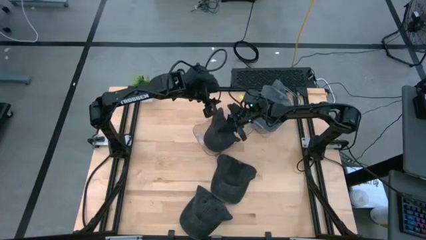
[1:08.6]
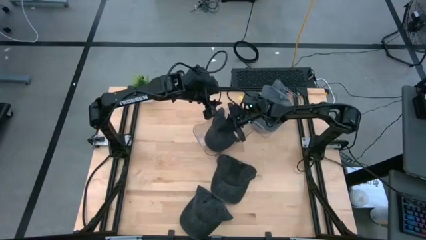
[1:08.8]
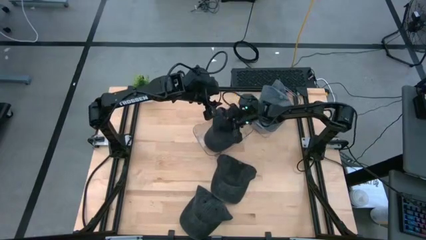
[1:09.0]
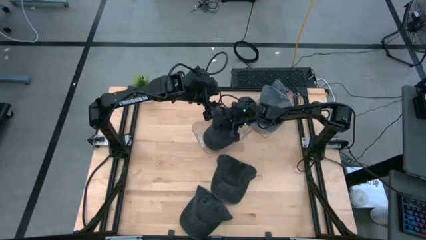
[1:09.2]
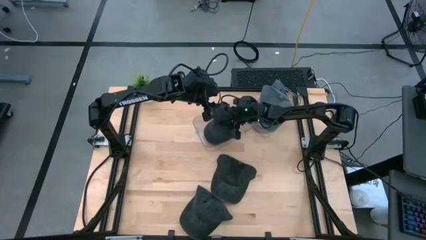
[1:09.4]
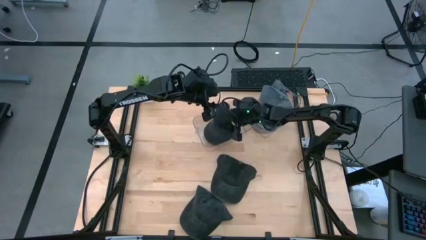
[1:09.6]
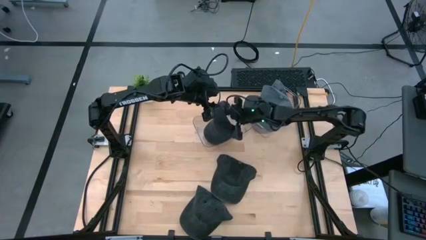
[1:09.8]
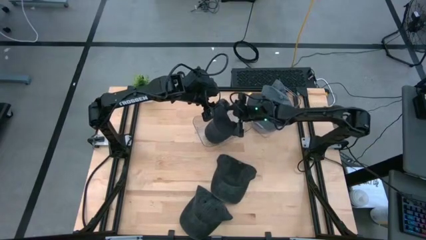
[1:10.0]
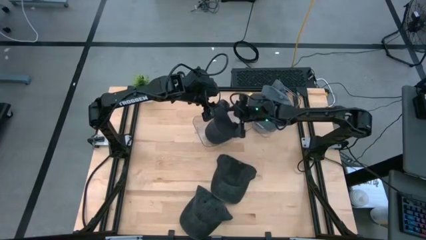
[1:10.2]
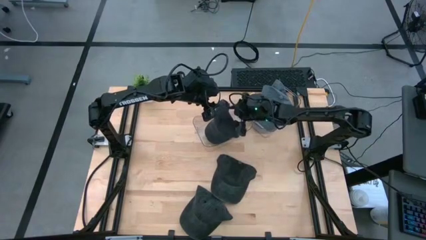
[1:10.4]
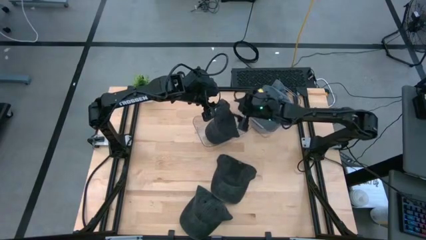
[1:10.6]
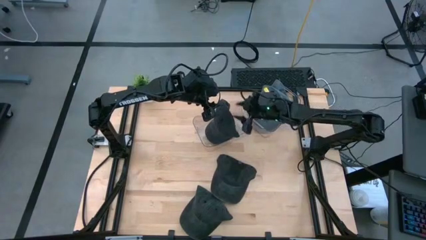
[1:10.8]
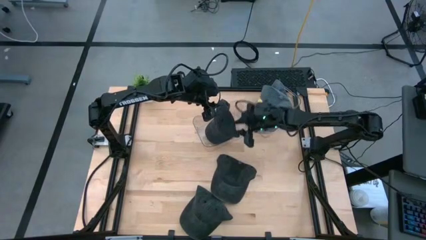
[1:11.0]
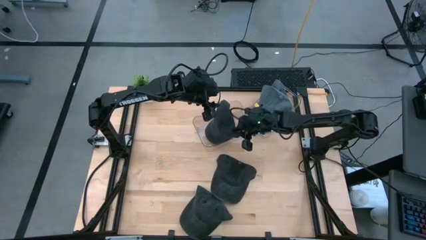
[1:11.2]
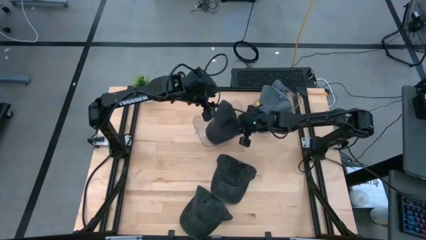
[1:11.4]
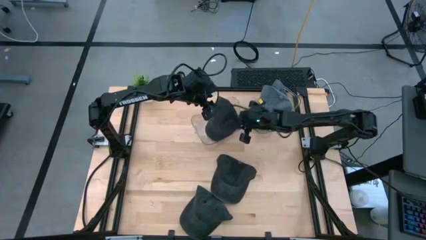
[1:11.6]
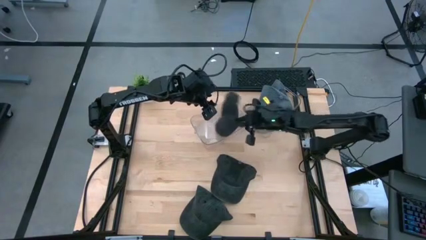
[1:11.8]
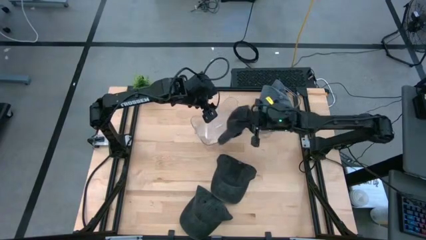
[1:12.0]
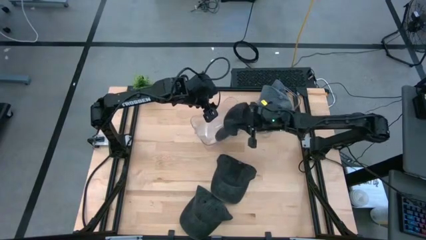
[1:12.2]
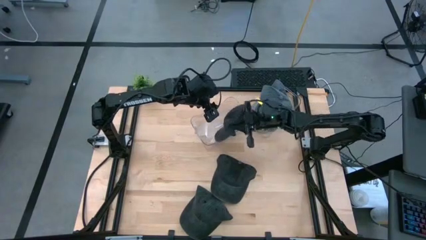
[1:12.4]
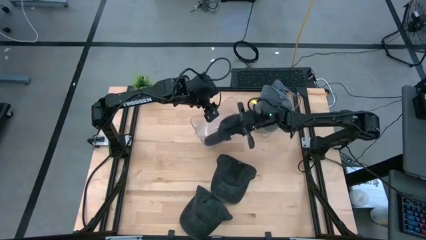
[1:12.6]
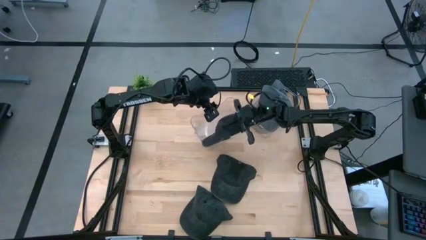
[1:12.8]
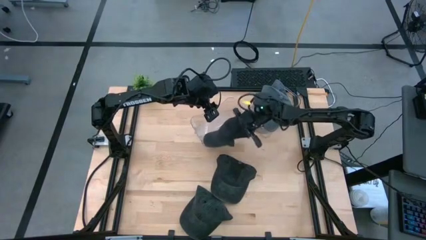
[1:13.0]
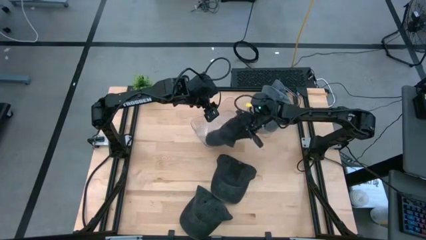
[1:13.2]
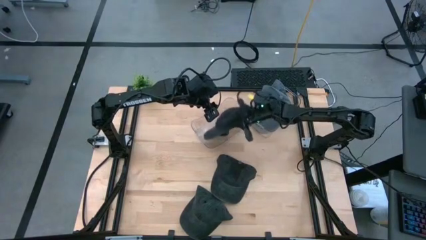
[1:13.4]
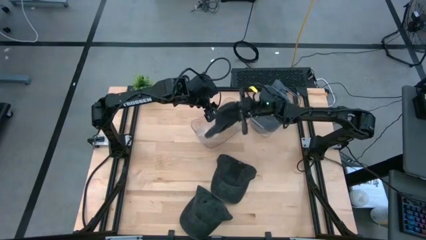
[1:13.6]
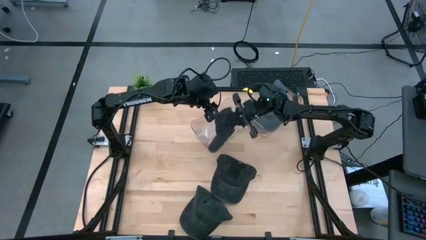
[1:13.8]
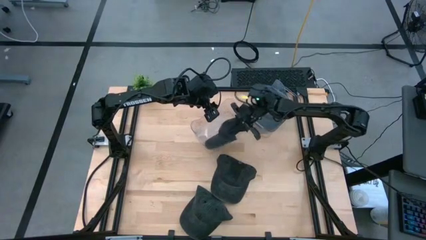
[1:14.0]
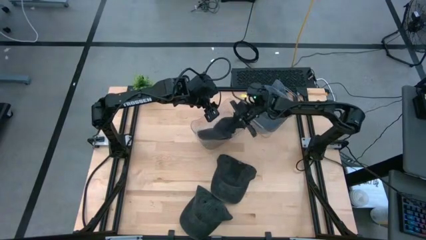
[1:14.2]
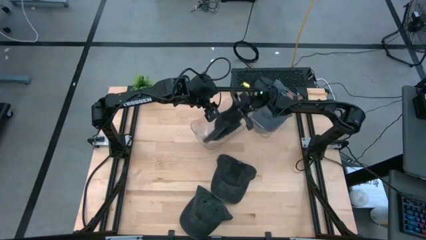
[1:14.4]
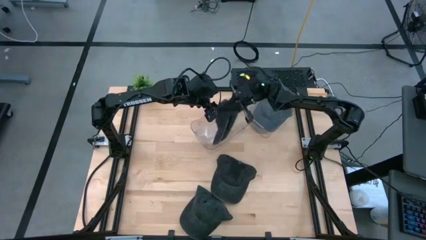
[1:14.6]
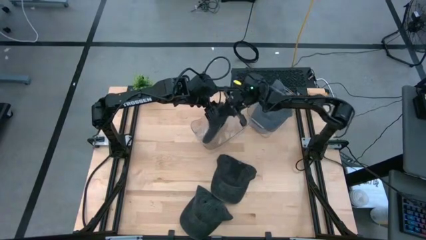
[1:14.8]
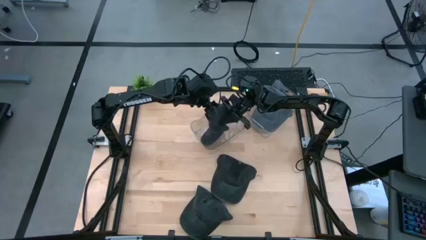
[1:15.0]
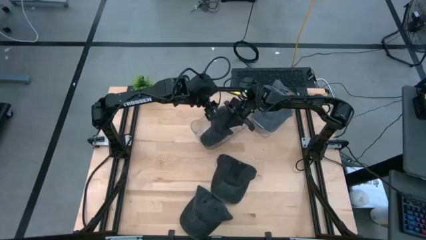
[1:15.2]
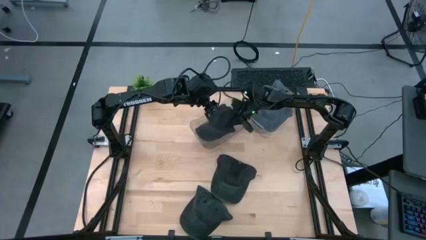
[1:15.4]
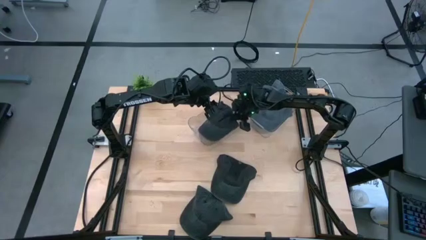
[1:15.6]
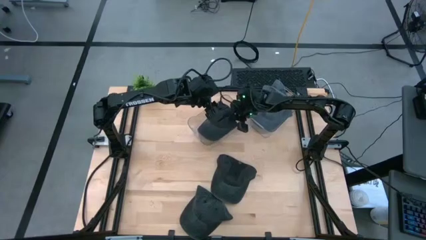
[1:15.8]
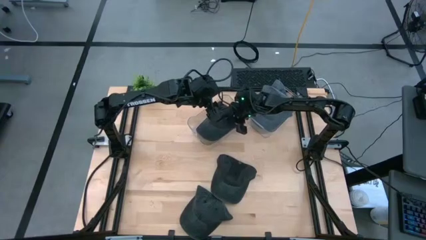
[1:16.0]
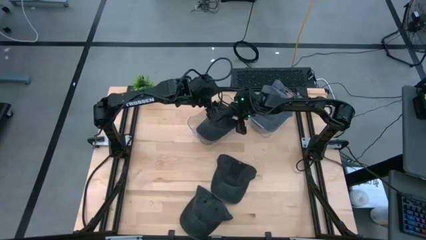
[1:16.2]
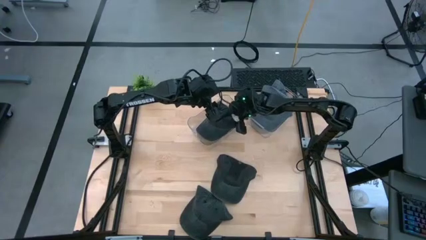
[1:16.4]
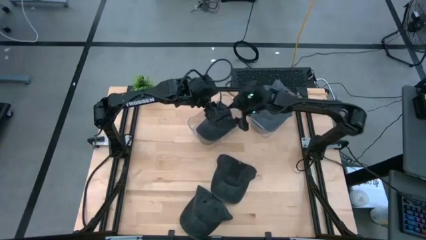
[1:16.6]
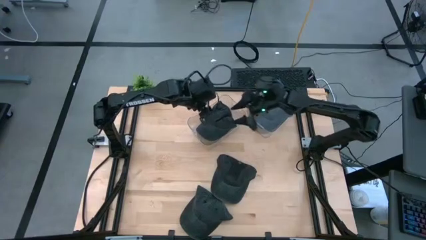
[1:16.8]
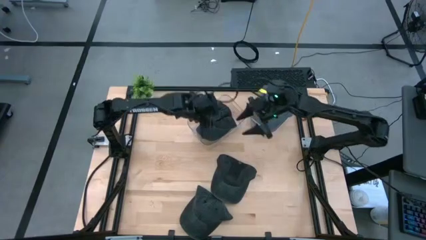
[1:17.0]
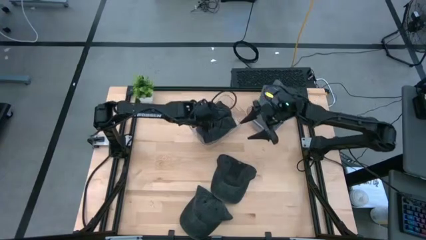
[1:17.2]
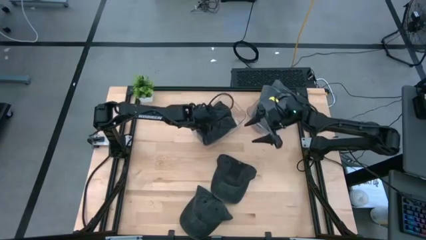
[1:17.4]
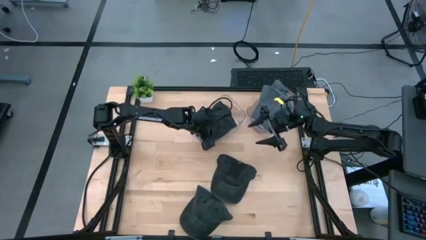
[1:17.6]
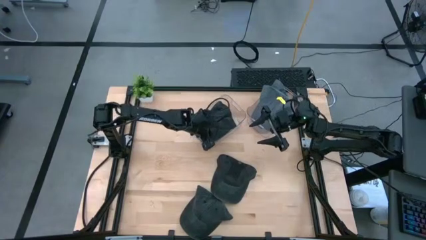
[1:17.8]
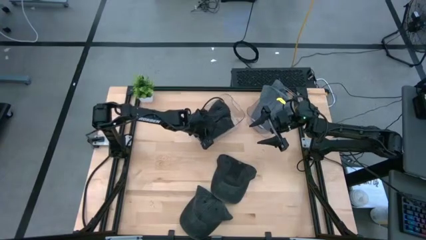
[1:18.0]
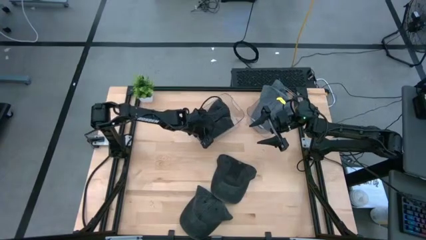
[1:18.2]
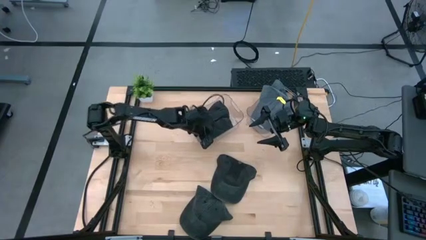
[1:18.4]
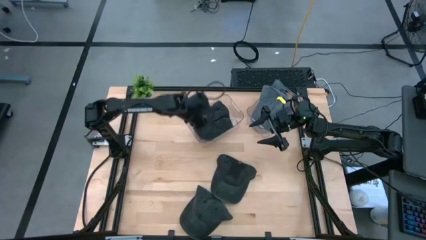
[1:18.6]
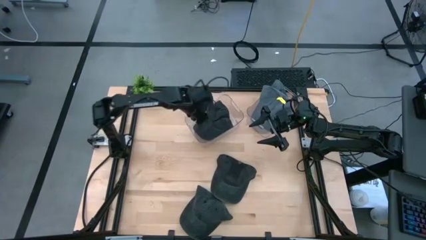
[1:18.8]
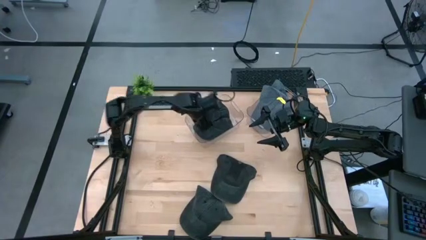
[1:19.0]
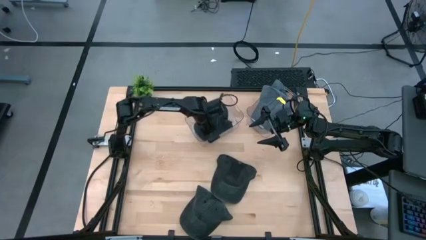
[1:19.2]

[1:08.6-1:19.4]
Task: Pick & Place hat
Put the top black cap into the left transparent bin

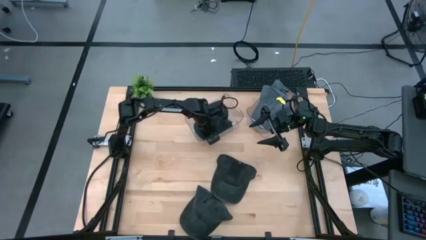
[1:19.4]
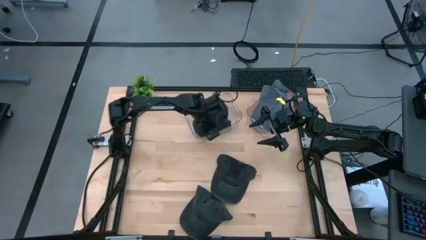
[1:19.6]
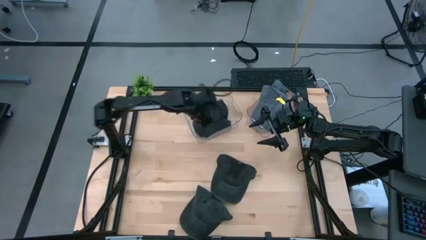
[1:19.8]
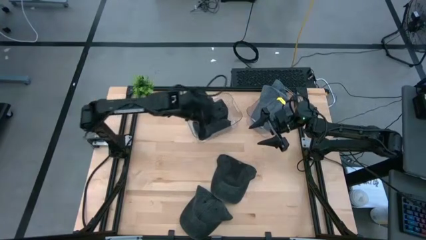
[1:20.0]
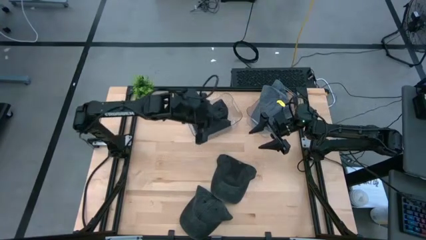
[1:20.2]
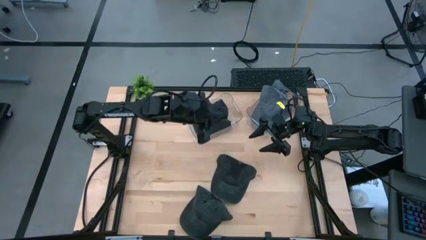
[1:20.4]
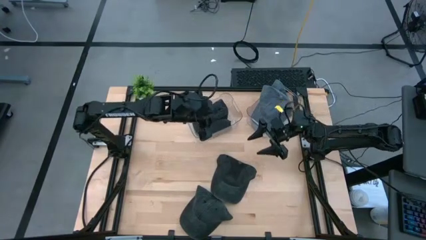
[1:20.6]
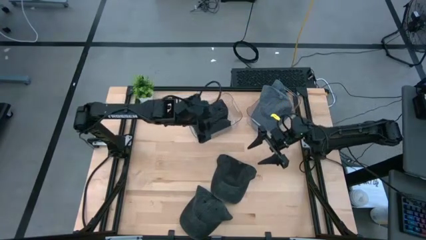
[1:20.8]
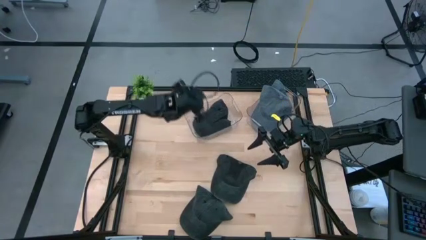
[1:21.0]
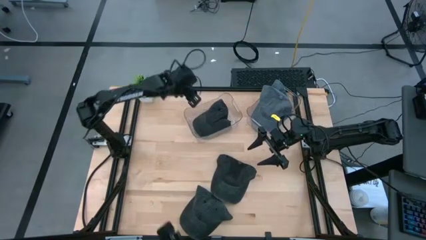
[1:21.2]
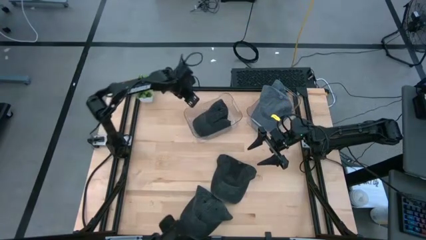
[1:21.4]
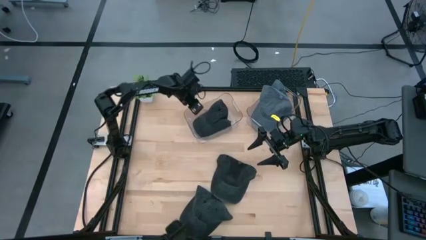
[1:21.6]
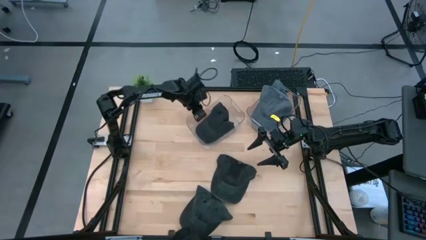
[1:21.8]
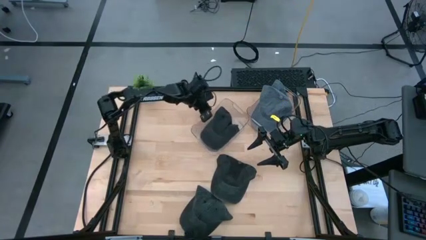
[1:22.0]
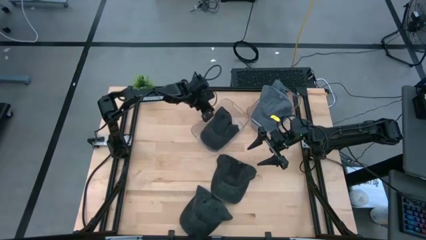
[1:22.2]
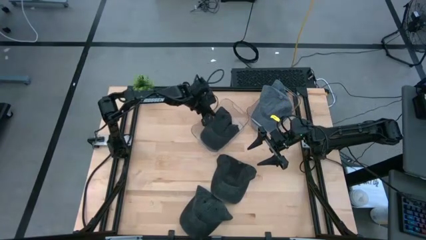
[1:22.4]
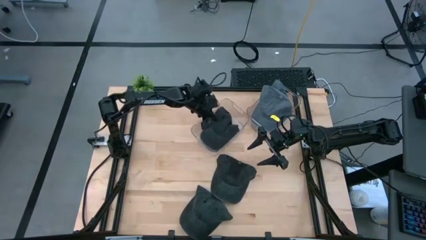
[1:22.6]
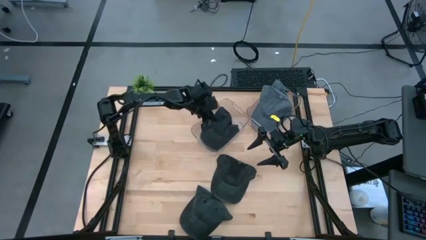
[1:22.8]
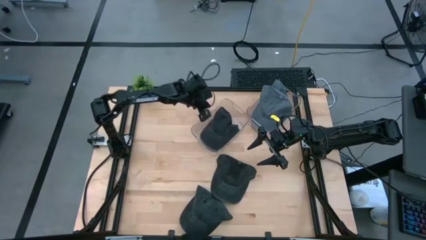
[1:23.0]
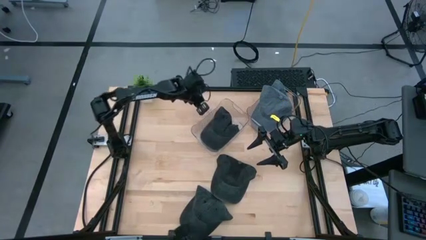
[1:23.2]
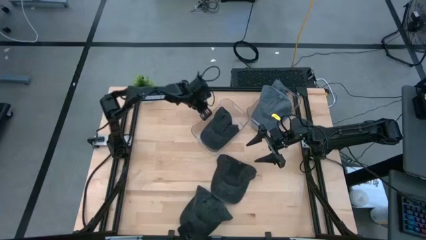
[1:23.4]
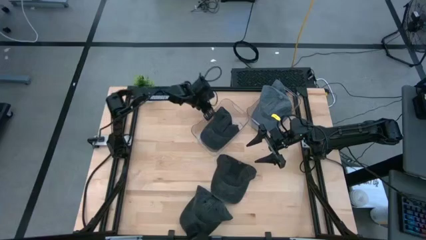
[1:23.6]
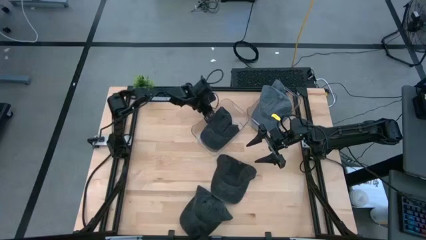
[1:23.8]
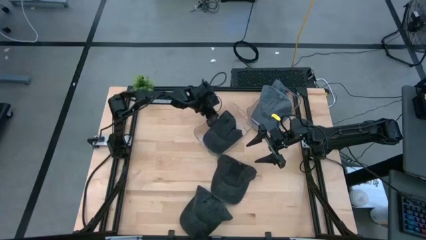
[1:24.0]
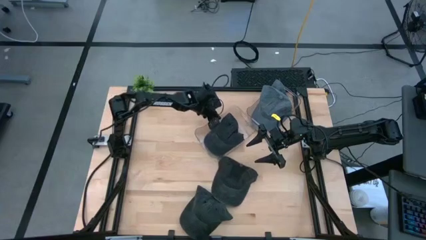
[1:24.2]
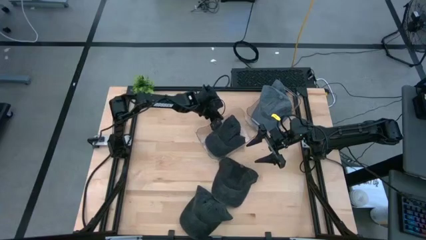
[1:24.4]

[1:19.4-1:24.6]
Adjust the left transparent bin
